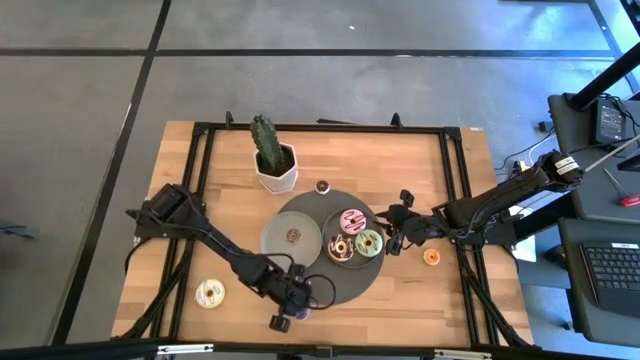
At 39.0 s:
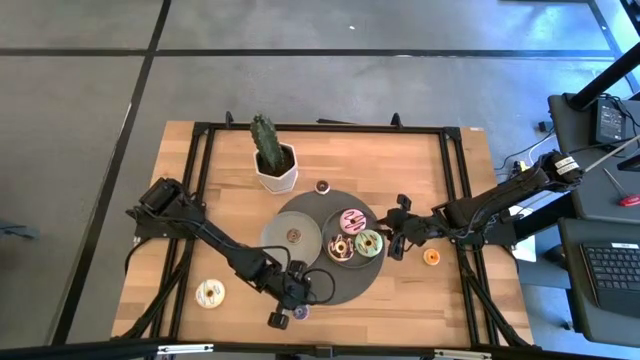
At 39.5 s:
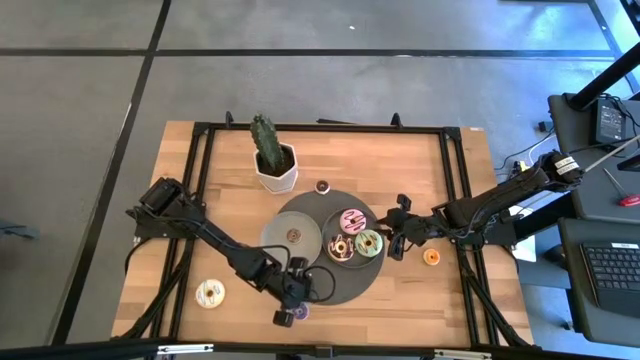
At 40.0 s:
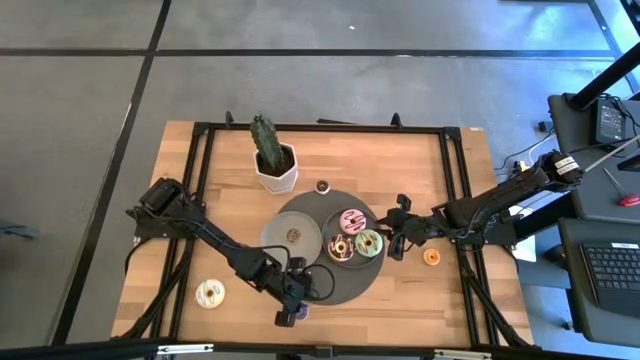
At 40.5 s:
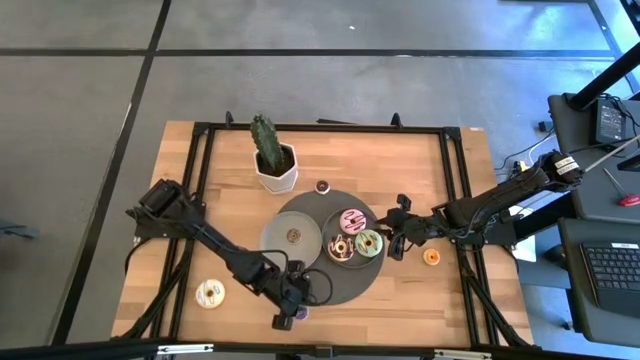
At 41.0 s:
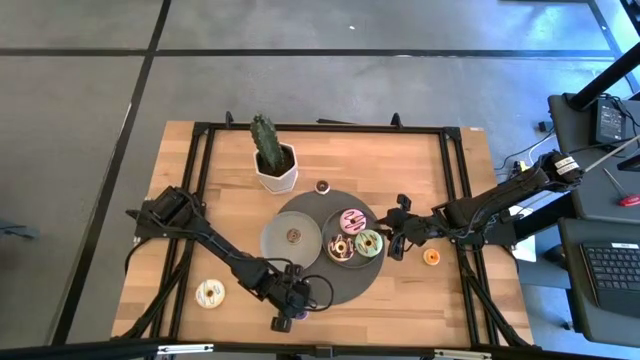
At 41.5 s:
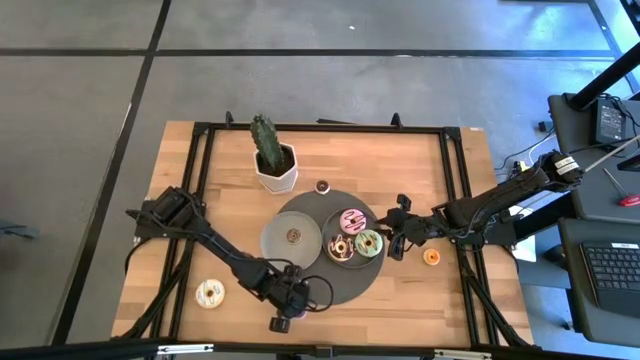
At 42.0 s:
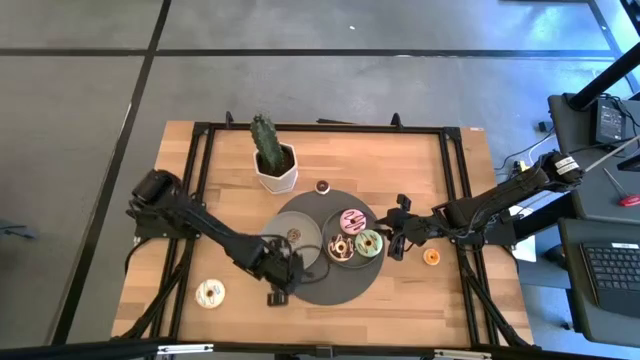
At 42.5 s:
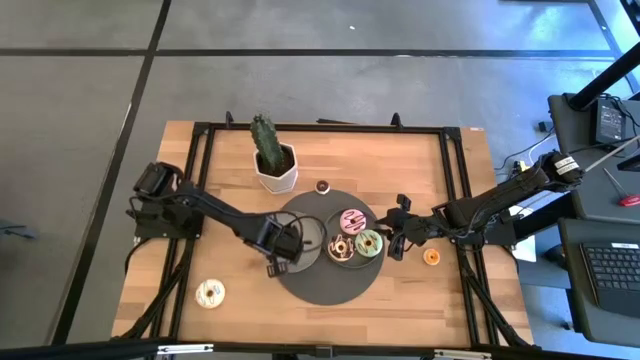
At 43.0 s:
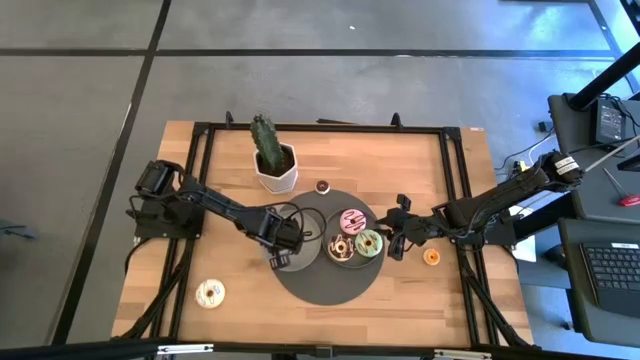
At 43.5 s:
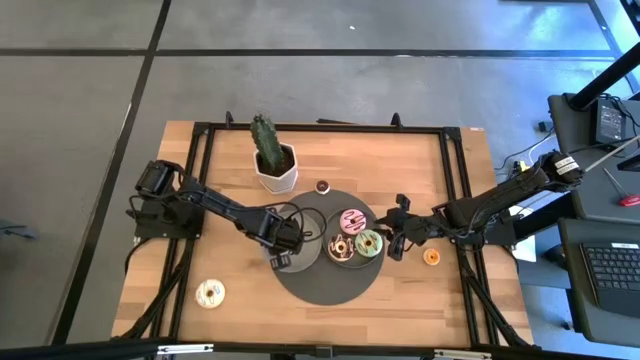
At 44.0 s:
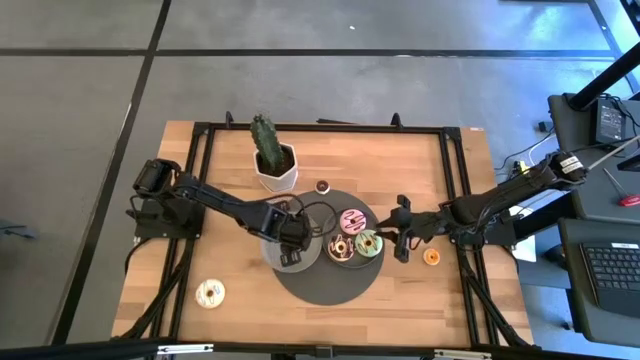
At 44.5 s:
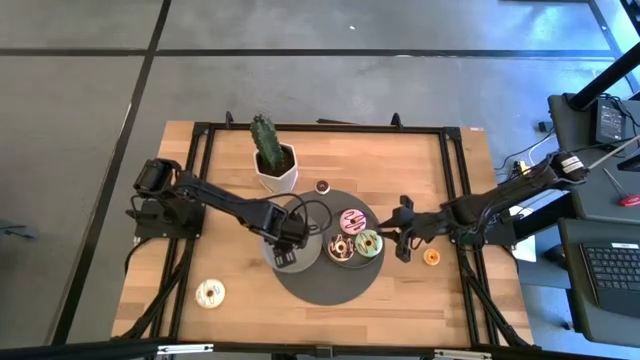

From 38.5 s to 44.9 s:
Task: Pick & Place donuts
Put the small blue donut on the gray plate

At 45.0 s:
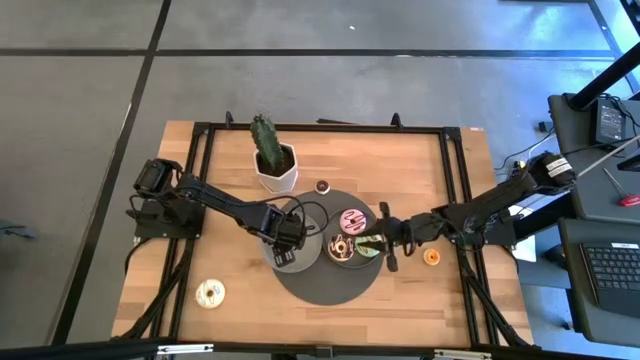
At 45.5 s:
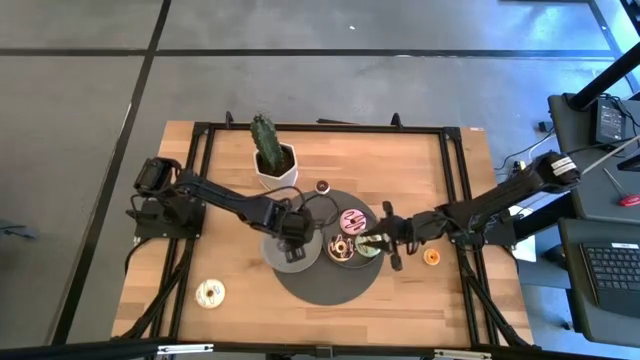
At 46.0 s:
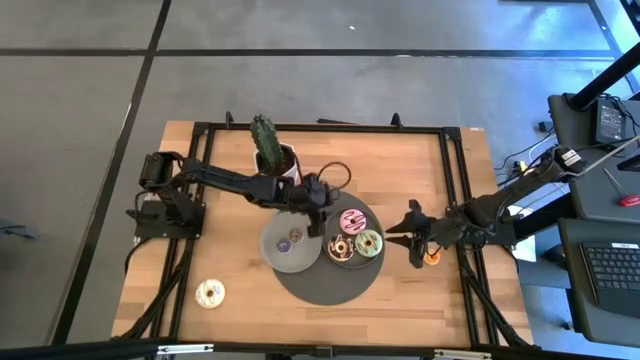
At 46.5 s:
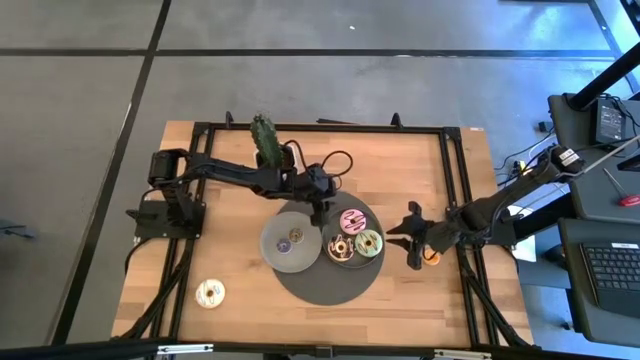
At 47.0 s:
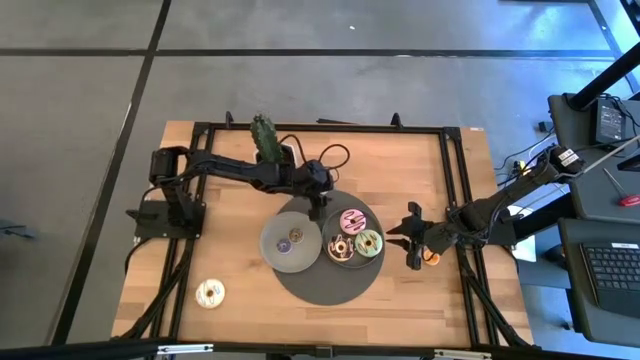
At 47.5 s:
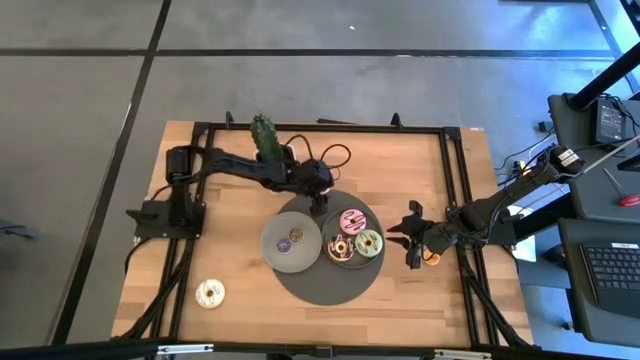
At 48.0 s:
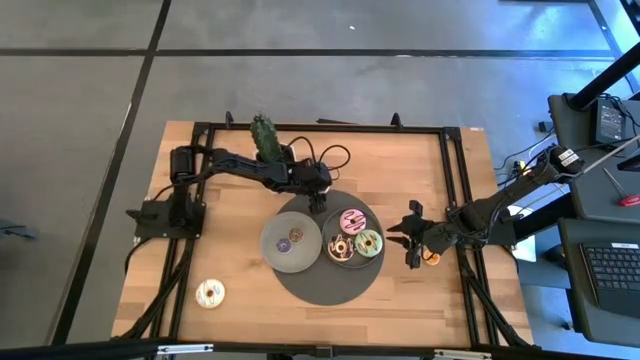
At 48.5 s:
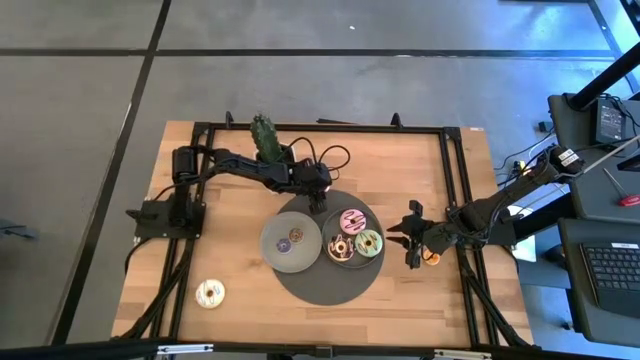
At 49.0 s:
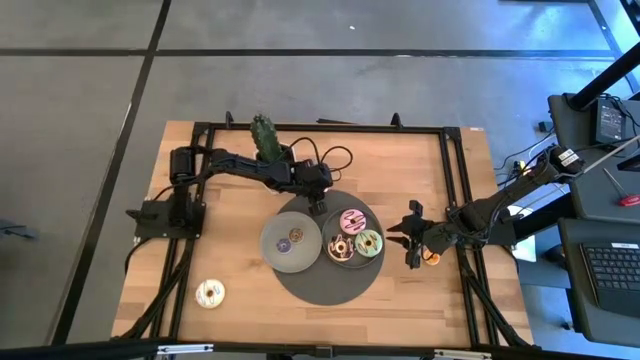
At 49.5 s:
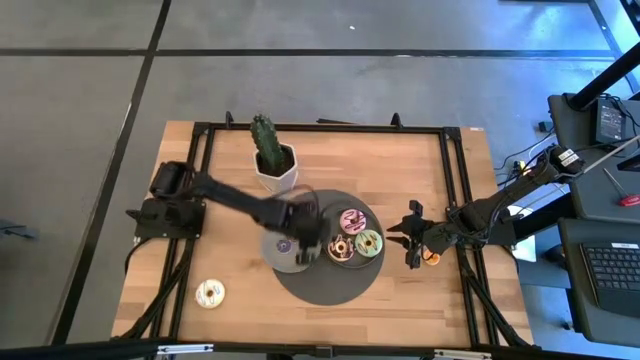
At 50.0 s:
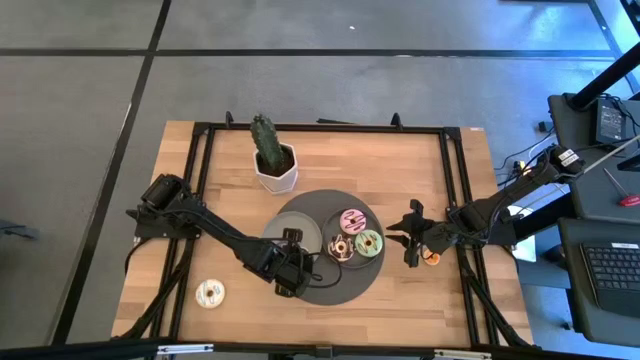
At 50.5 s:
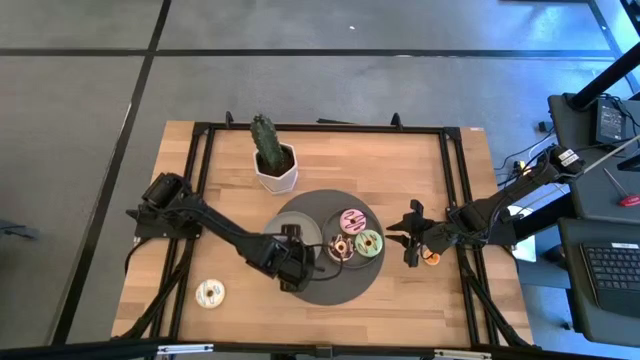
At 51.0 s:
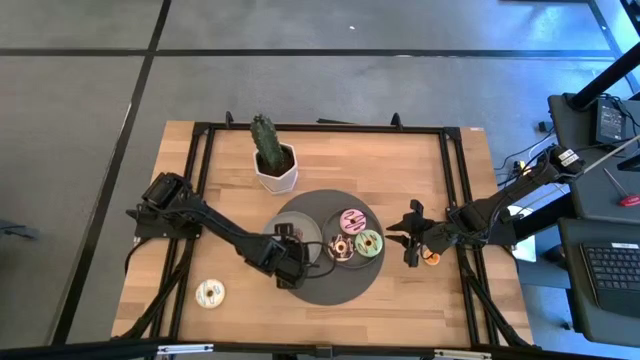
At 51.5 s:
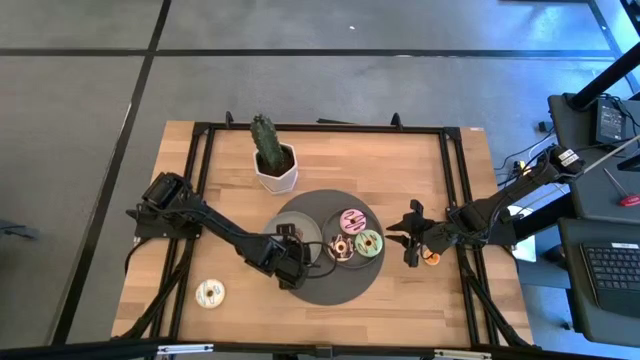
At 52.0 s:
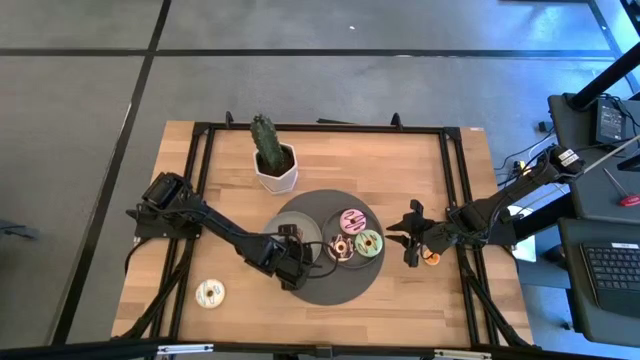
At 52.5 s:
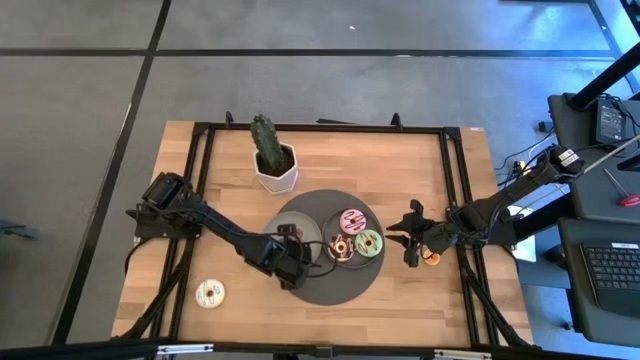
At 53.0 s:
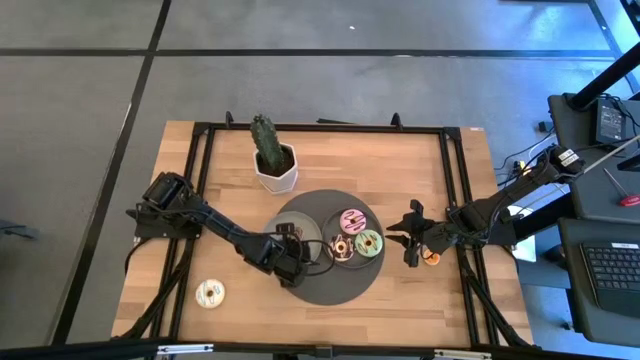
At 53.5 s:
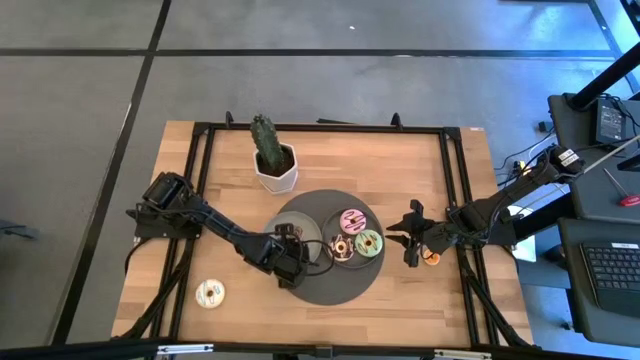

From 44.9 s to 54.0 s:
Put the small dark brown donut on the gray plate

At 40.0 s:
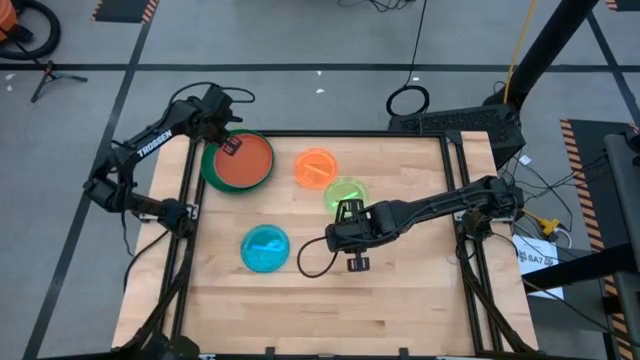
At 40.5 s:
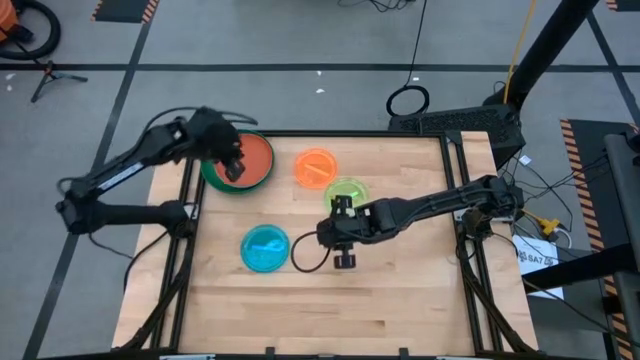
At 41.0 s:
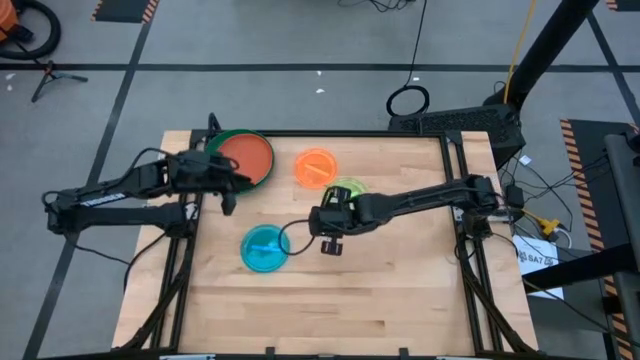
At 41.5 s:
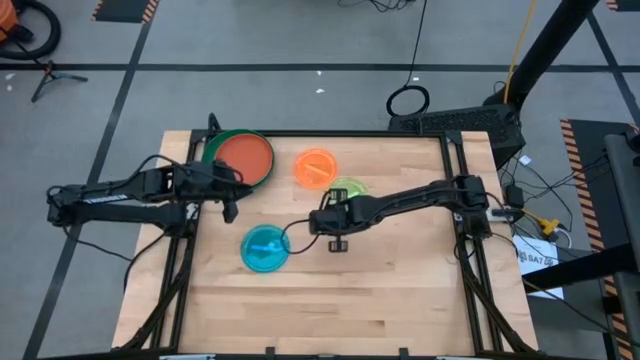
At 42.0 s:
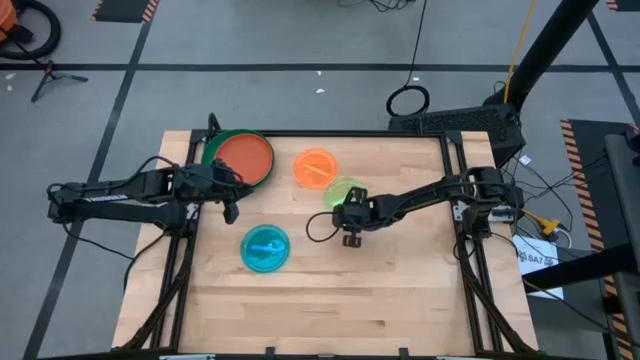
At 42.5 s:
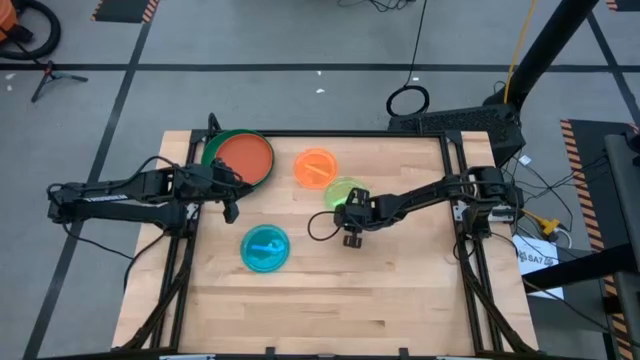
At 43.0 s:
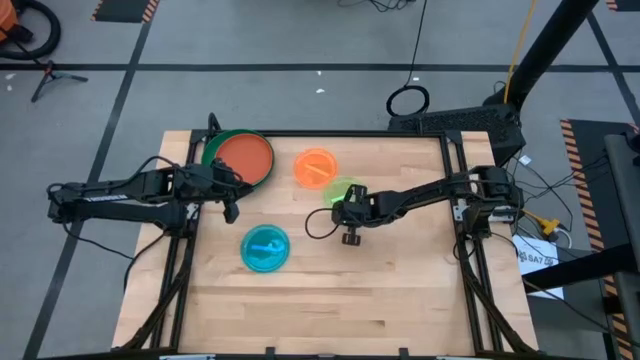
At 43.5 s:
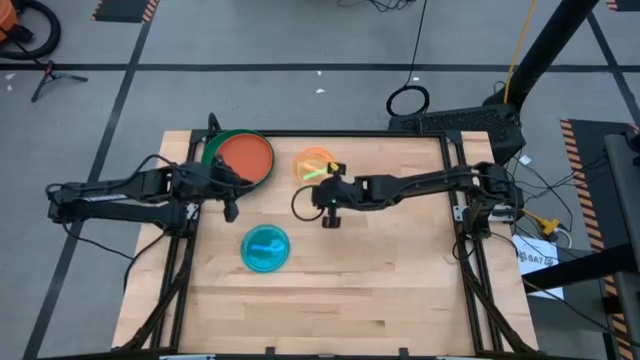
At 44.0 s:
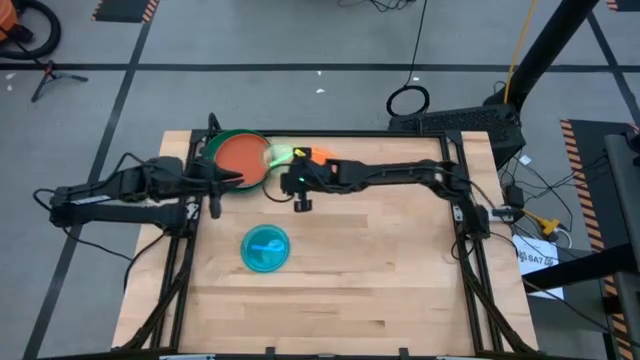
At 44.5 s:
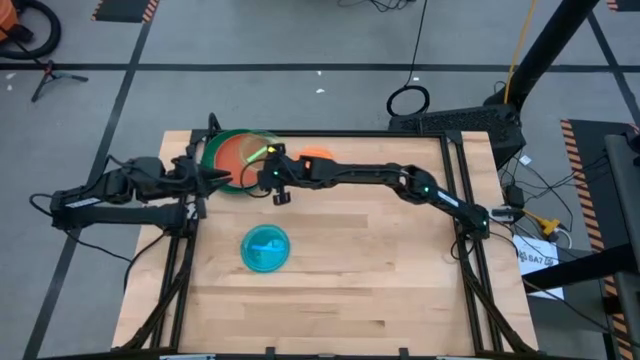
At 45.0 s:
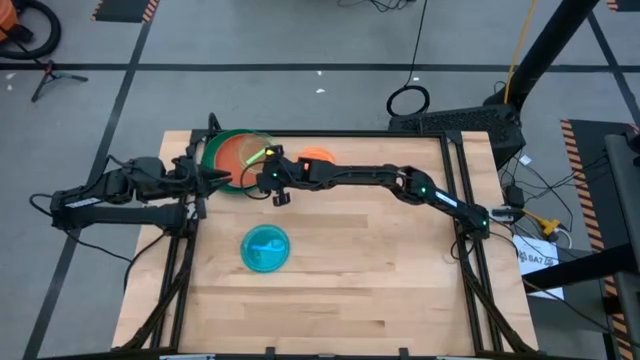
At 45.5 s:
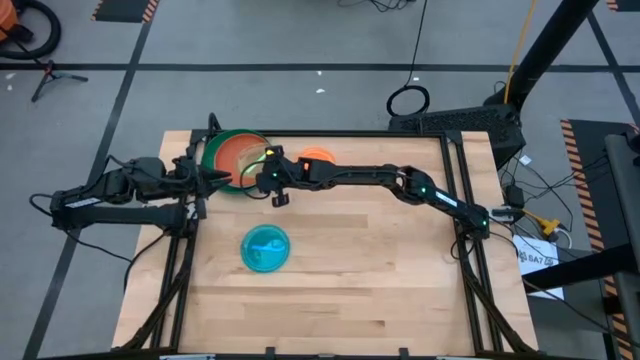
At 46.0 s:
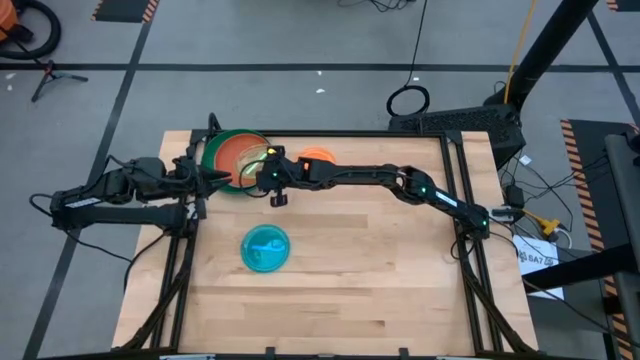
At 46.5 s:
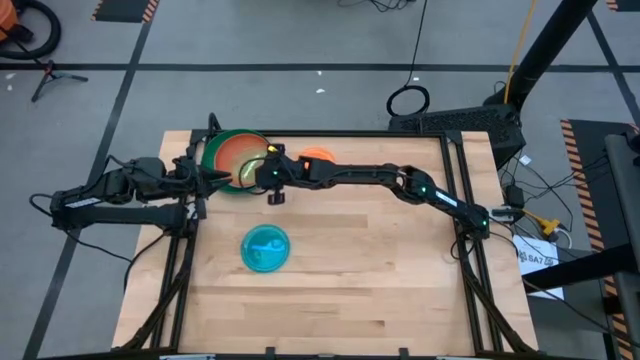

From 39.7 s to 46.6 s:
Task: Stack plastic plates
Stack the light green plate on top of the orange plate
